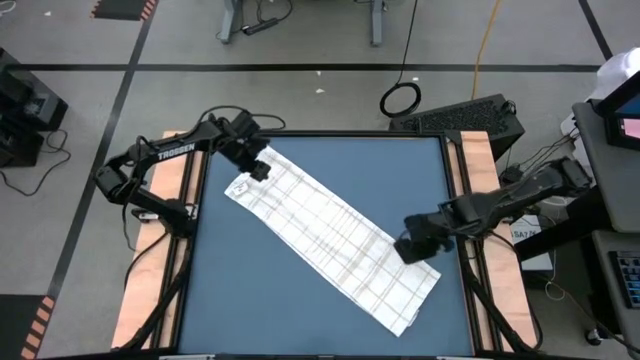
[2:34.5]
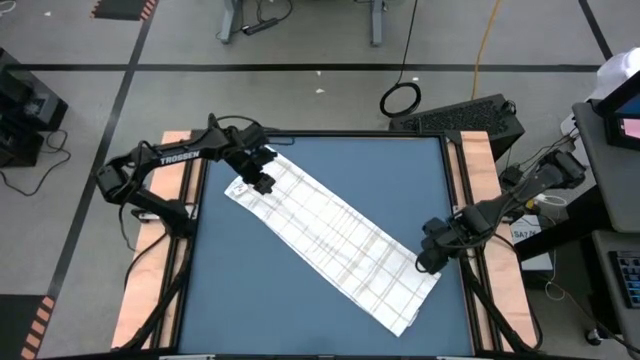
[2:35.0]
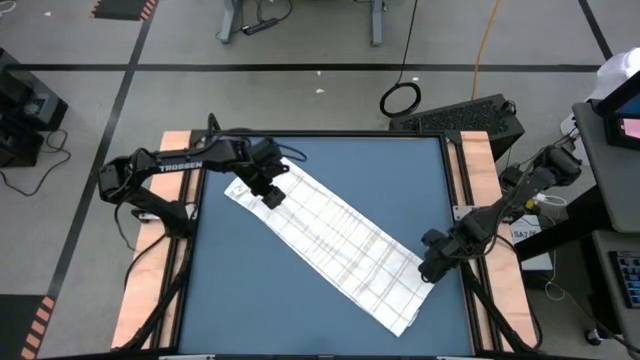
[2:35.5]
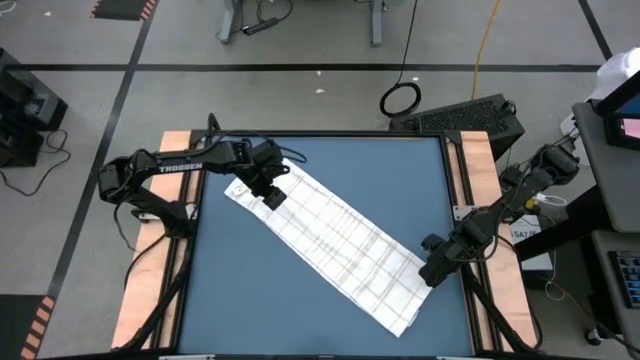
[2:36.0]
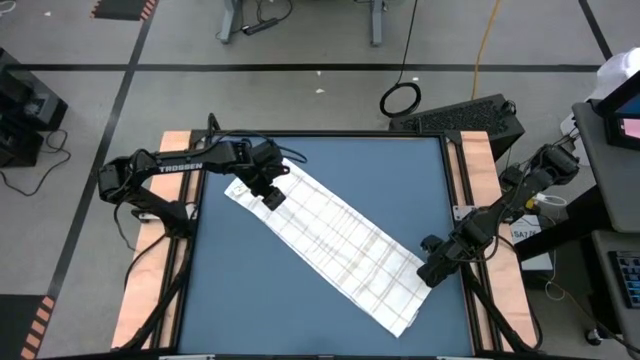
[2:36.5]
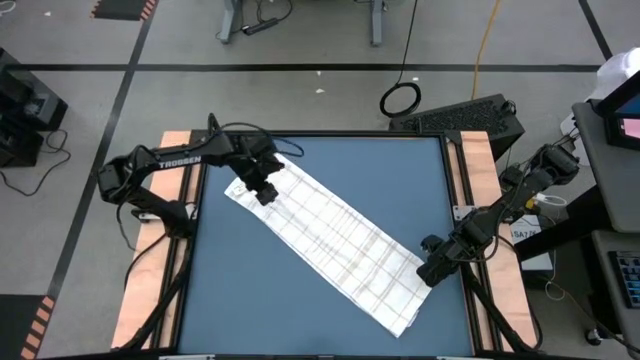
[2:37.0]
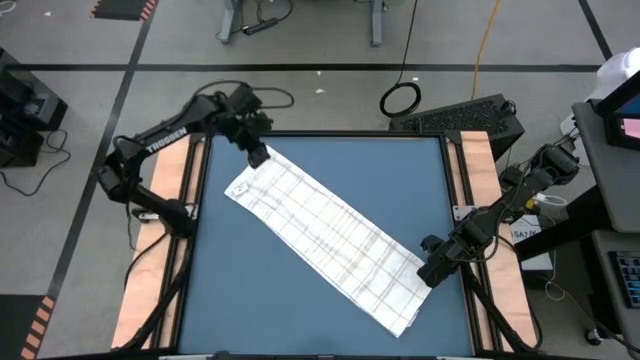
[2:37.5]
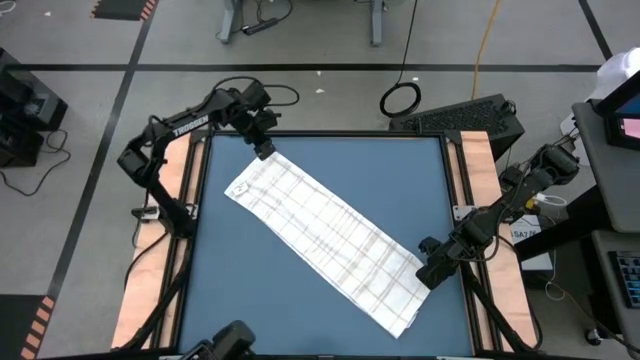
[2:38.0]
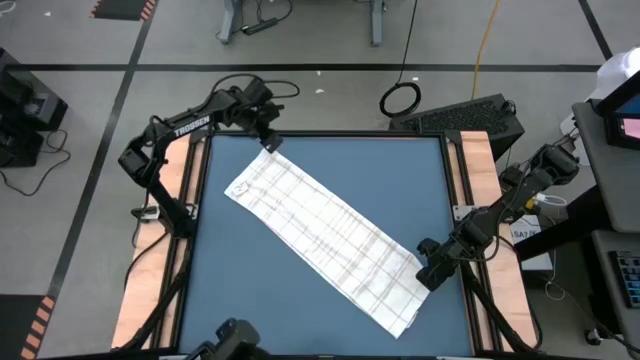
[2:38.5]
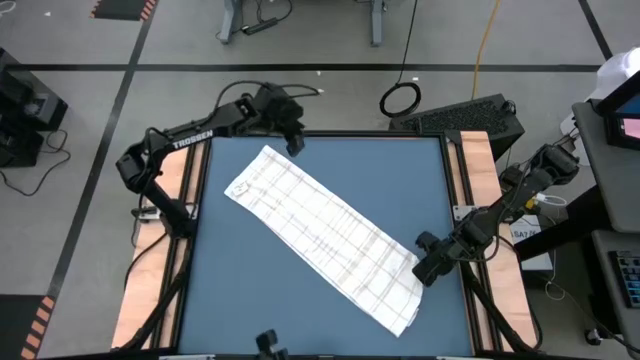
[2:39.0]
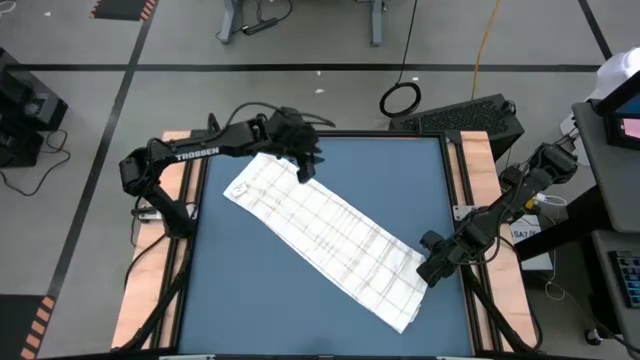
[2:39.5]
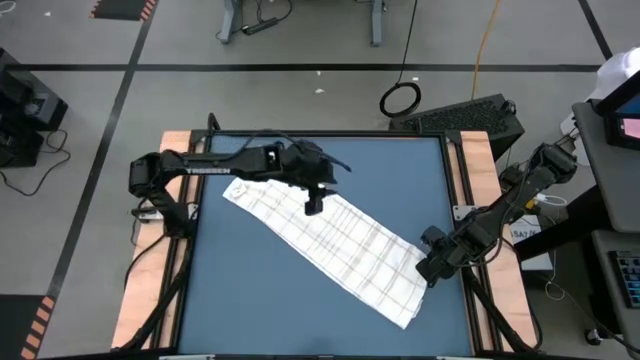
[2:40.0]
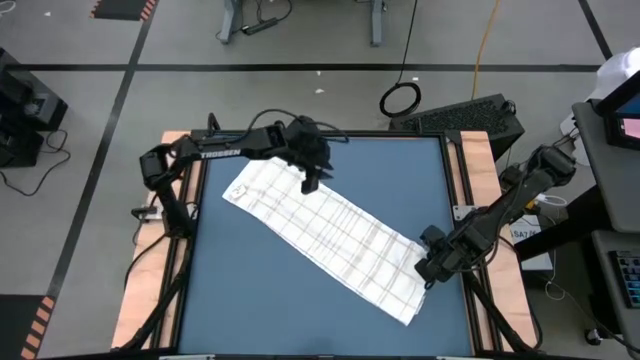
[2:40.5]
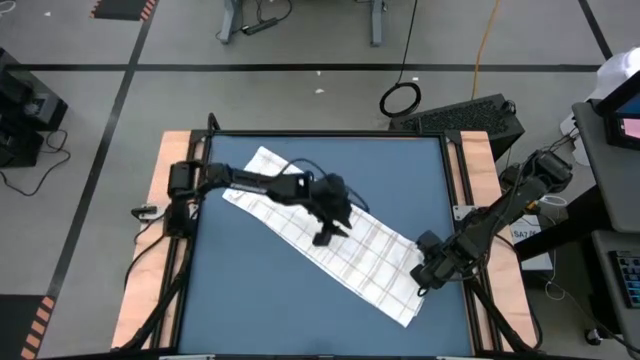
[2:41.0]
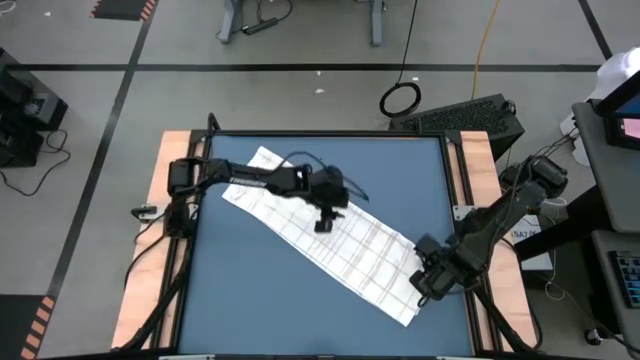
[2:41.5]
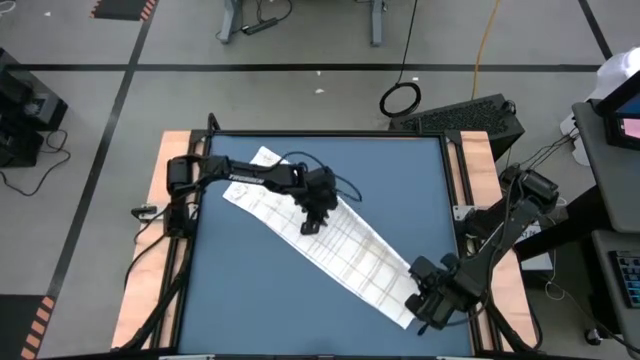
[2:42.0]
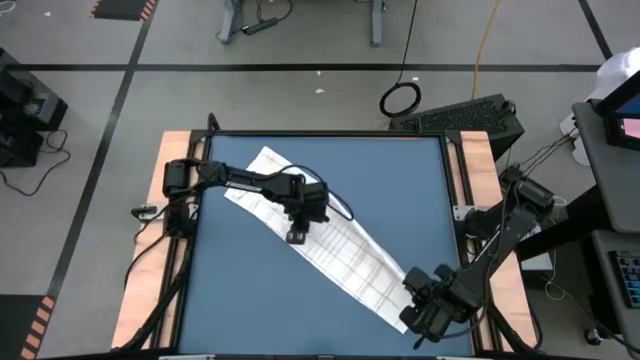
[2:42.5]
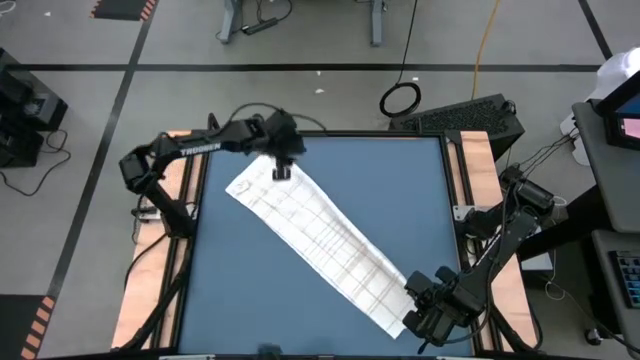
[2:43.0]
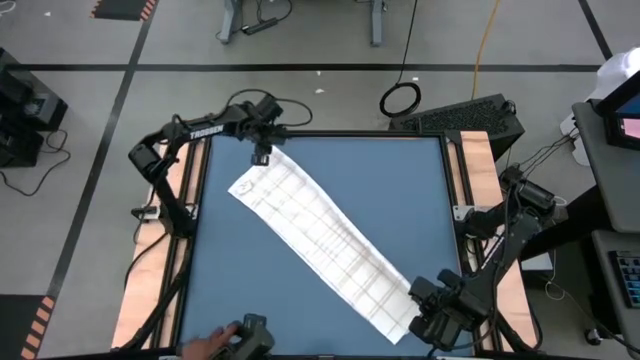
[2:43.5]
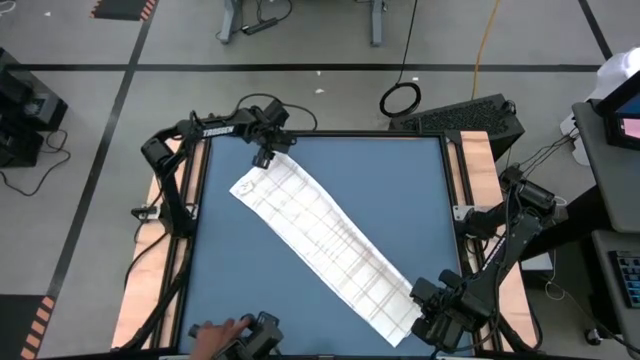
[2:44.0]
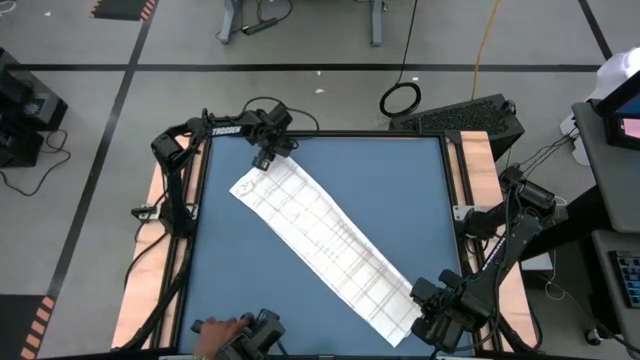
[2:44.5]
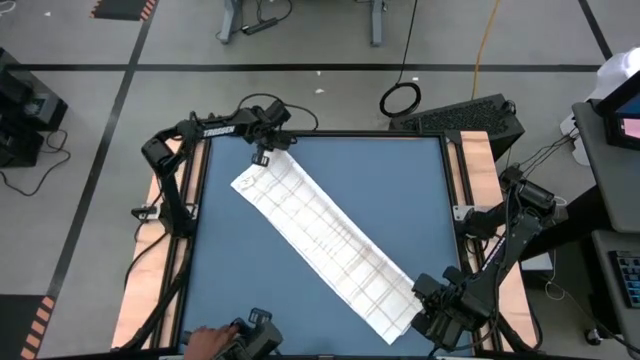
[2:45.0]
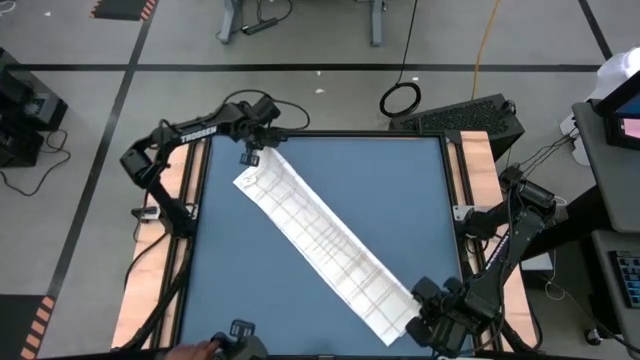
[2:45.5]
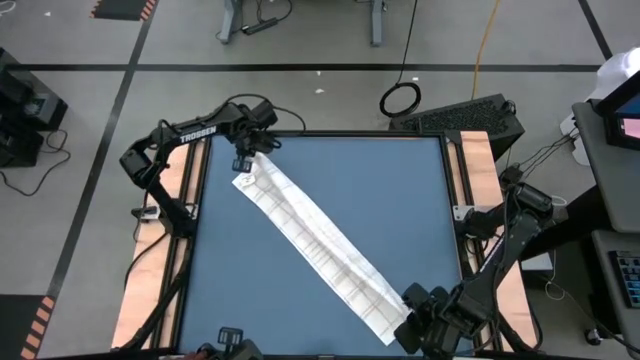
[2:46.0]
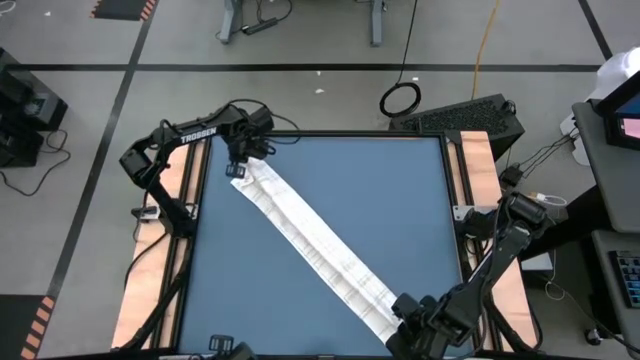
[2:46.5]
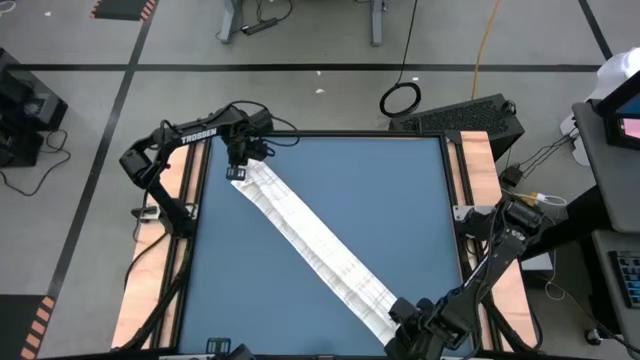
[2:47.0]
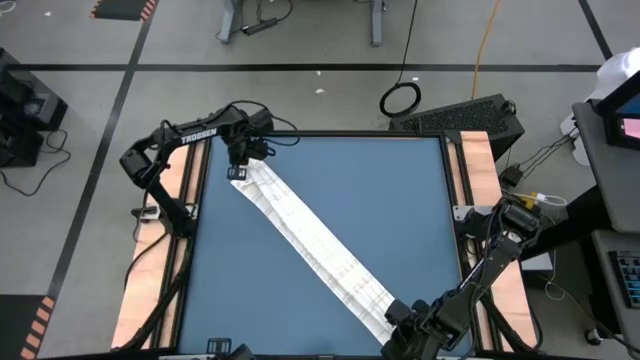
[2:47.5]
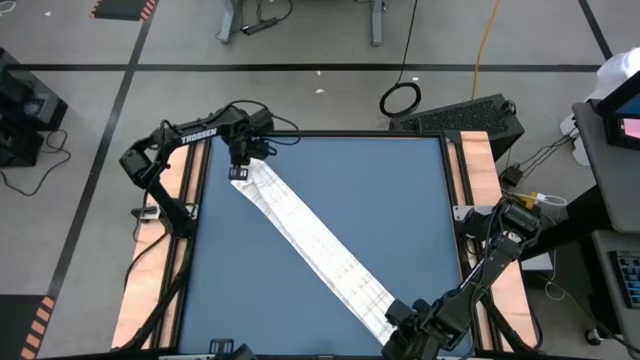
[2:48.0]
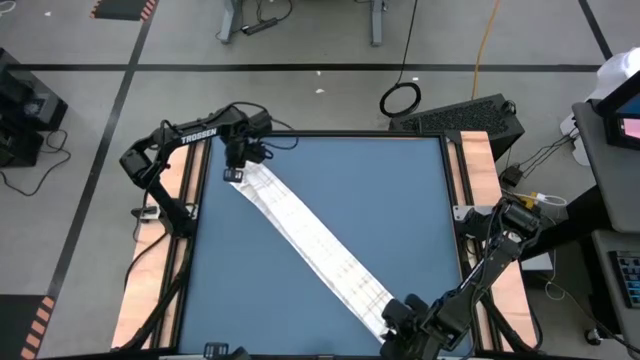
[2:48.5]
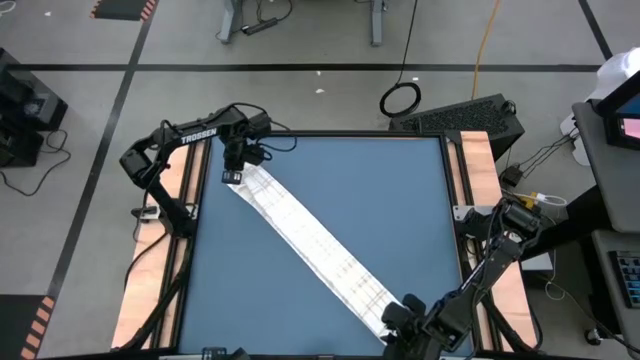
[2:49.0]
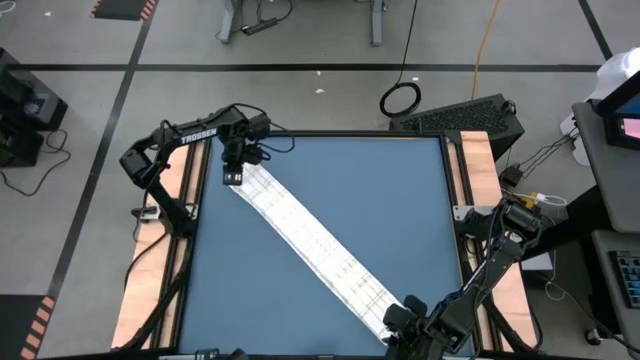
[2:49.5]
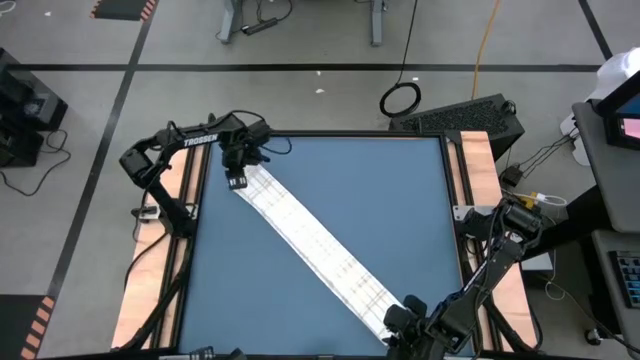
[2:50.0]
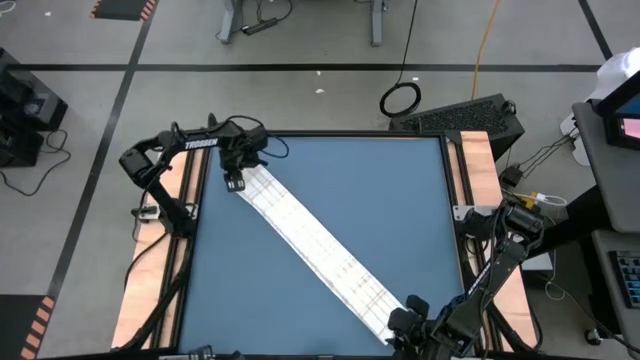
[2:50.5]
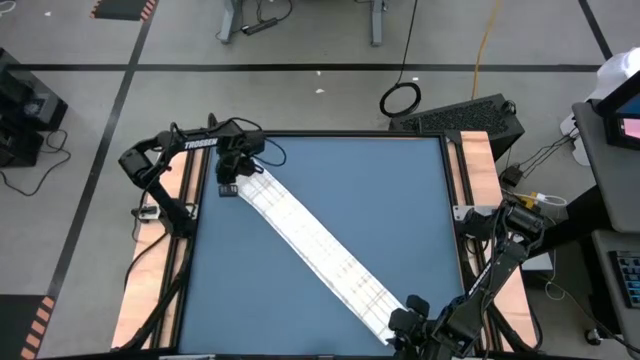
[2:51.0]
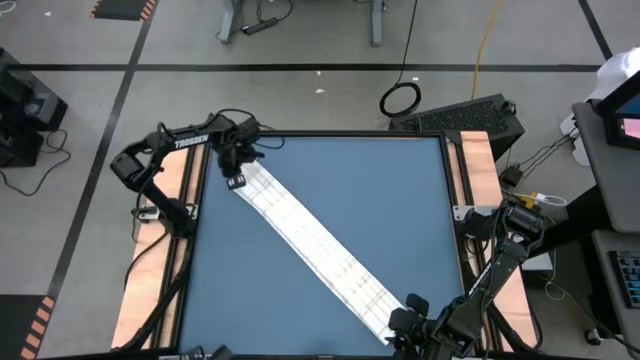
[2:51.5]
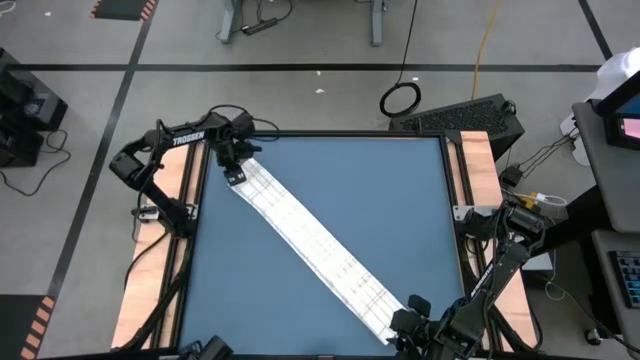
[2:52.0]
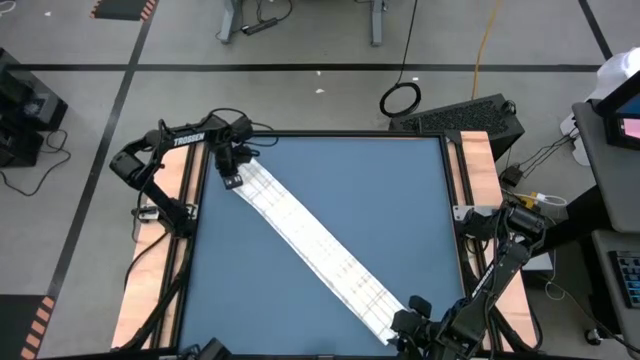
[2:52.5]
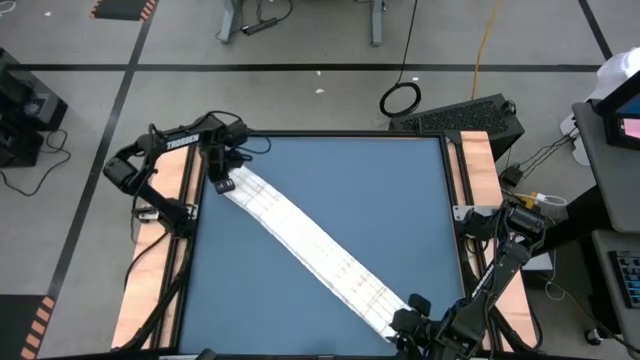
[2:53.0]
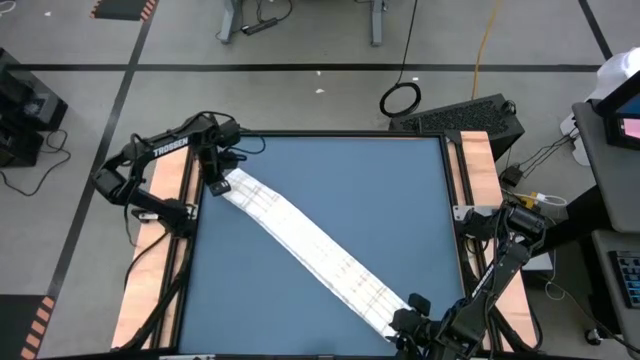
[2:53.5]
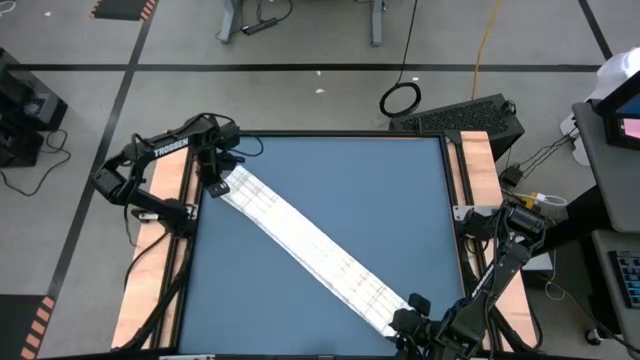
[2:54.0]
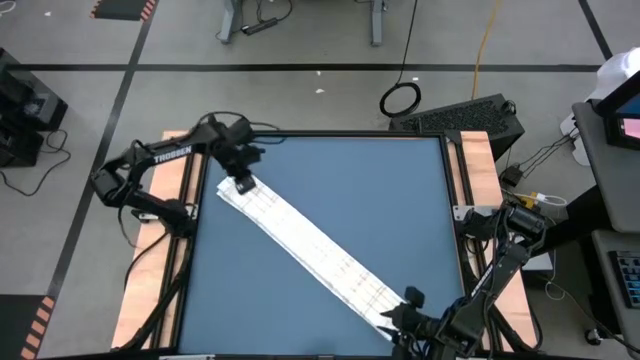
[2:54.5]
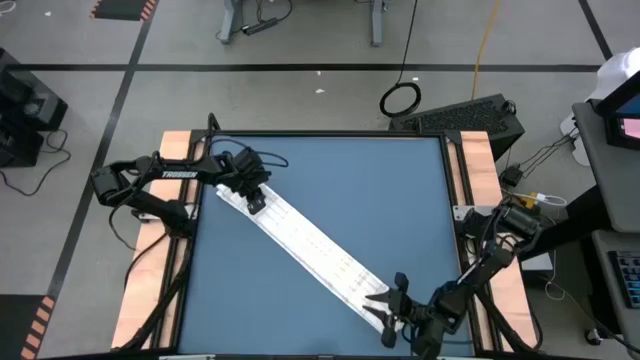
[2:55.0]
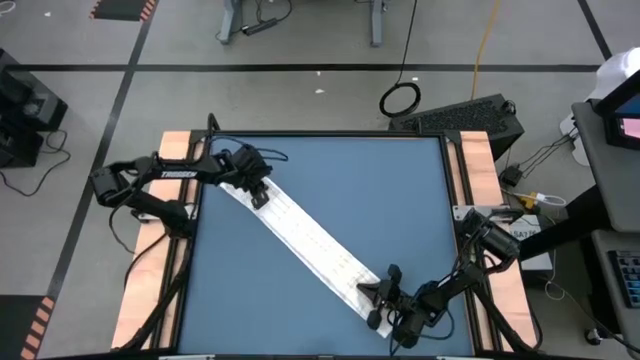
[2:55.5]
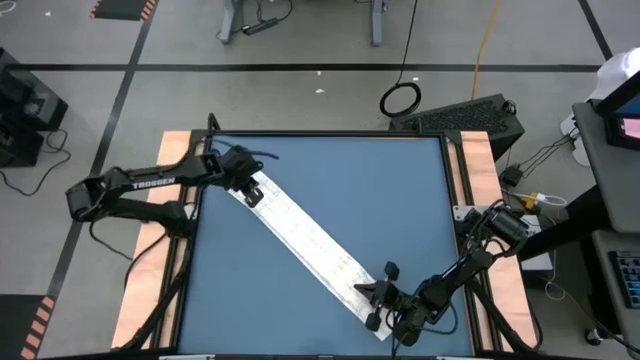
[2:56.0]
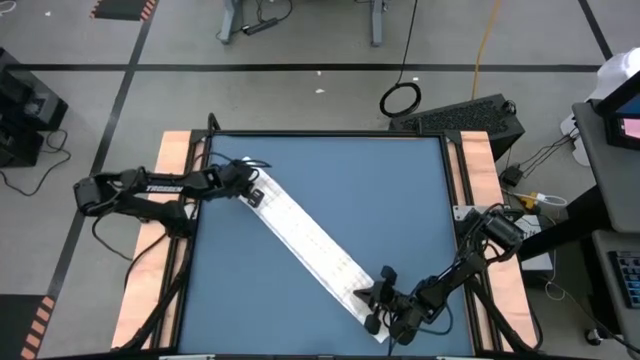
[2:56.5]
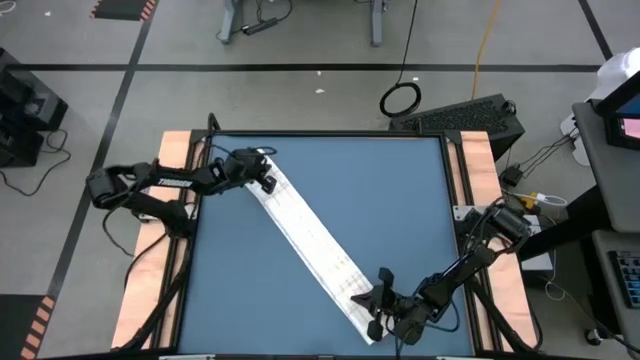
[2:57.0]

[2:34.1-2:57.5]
Task: Roll towel into tight, uniform cylinder
Roll the white towel
